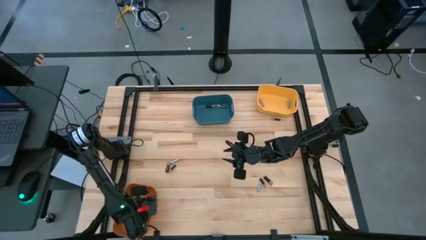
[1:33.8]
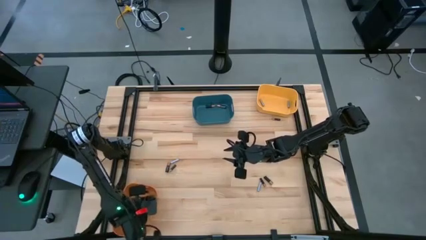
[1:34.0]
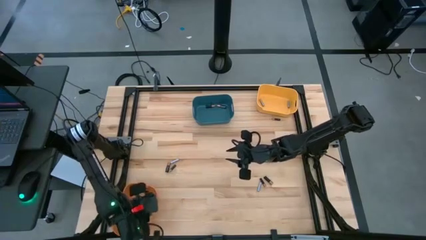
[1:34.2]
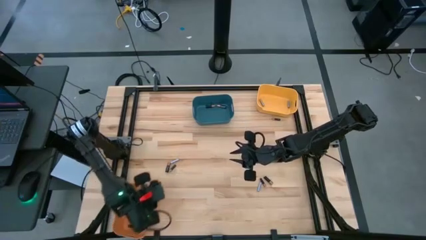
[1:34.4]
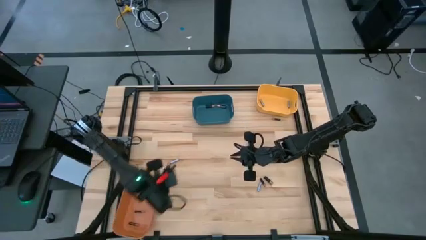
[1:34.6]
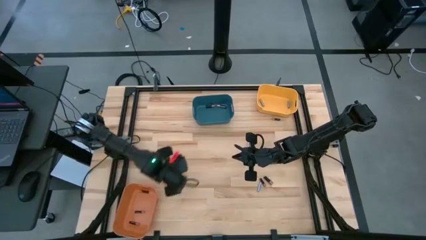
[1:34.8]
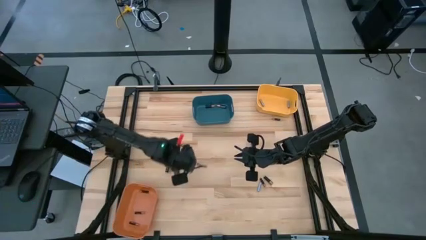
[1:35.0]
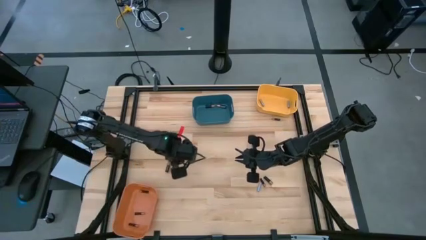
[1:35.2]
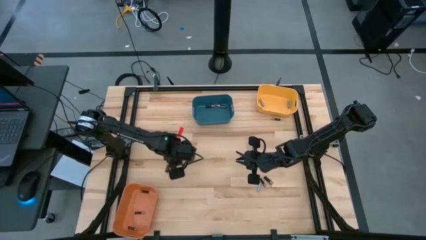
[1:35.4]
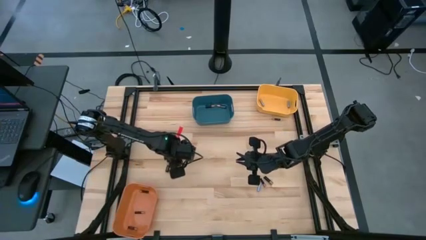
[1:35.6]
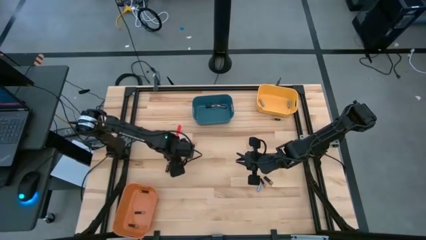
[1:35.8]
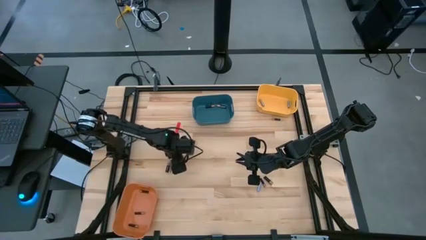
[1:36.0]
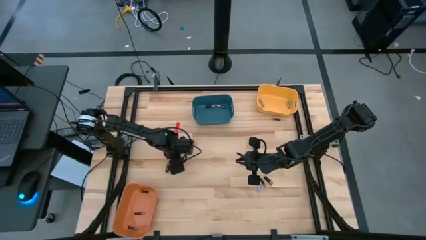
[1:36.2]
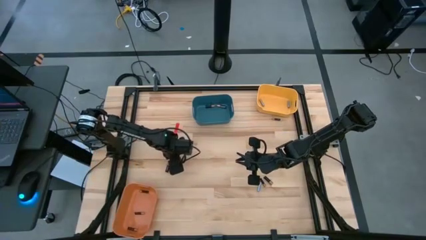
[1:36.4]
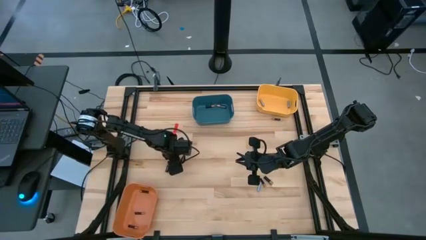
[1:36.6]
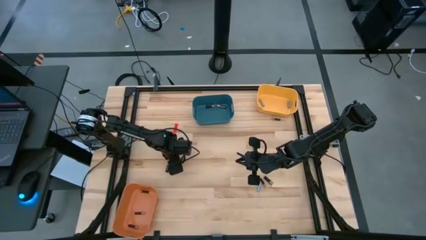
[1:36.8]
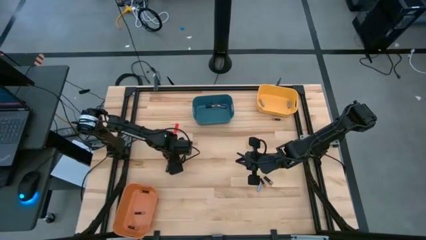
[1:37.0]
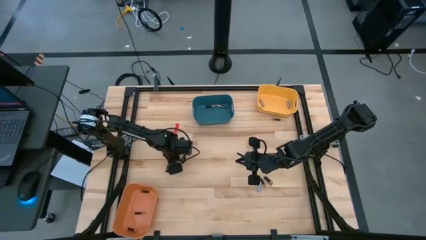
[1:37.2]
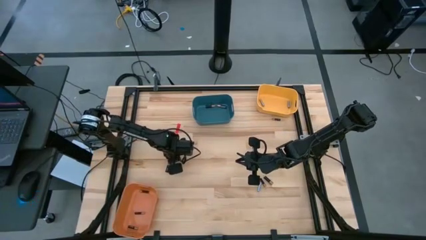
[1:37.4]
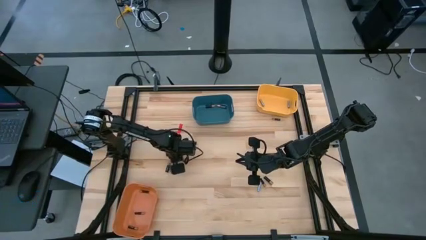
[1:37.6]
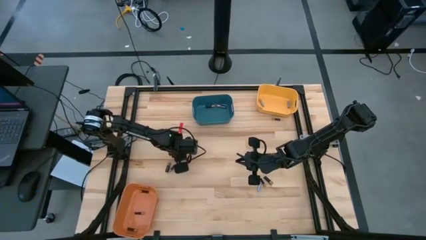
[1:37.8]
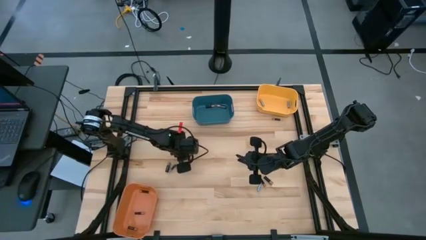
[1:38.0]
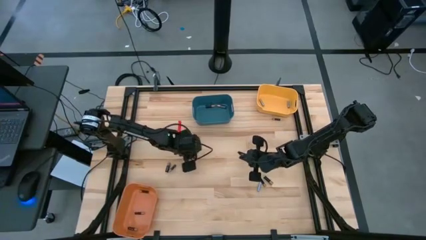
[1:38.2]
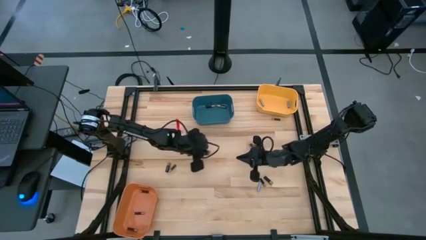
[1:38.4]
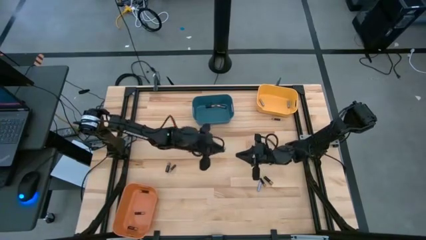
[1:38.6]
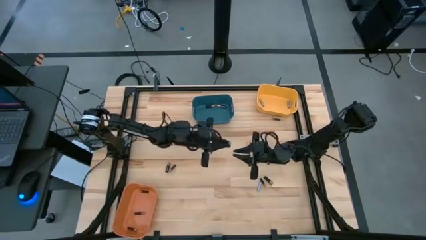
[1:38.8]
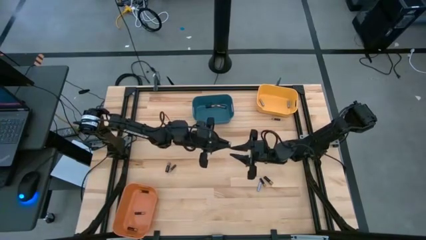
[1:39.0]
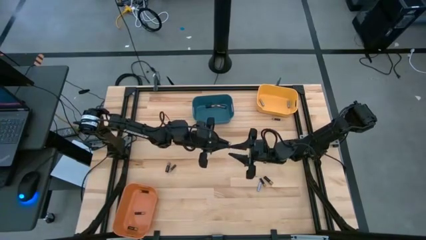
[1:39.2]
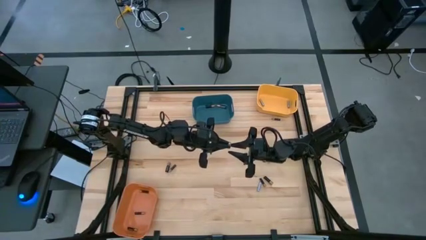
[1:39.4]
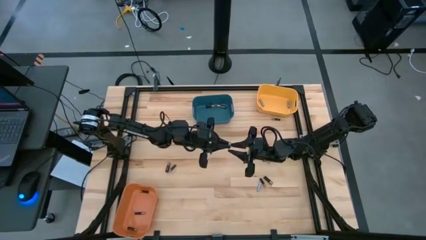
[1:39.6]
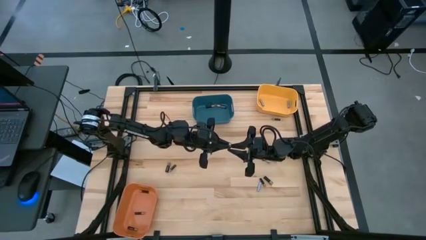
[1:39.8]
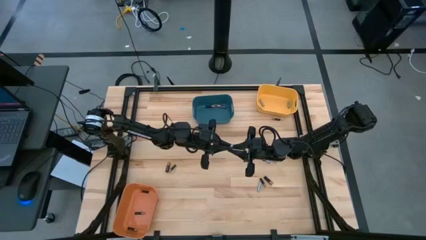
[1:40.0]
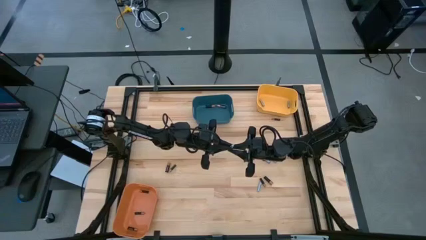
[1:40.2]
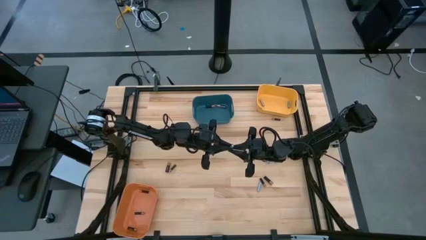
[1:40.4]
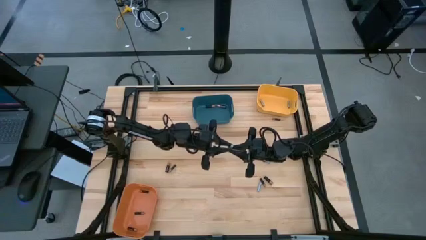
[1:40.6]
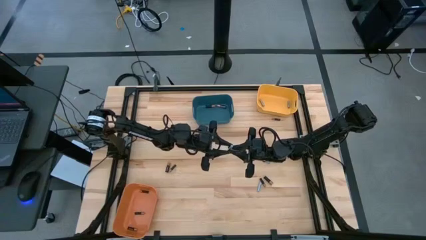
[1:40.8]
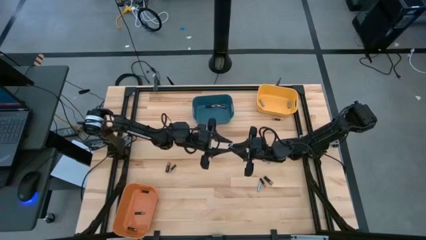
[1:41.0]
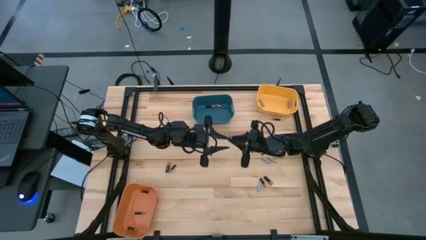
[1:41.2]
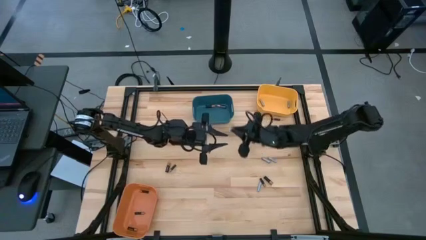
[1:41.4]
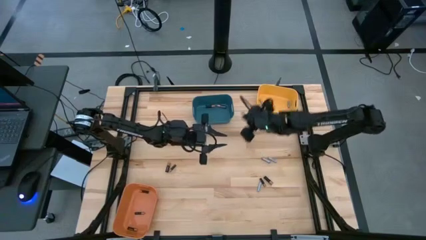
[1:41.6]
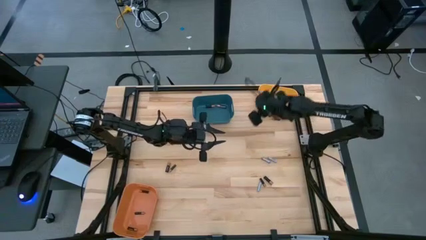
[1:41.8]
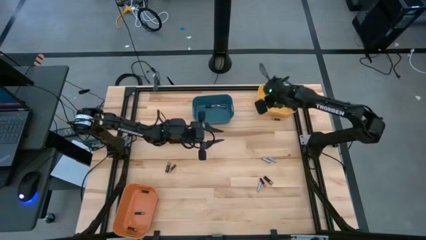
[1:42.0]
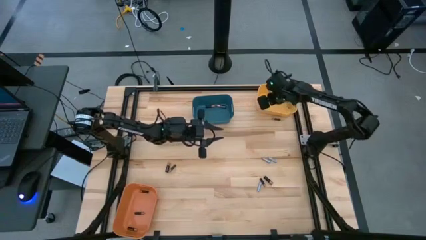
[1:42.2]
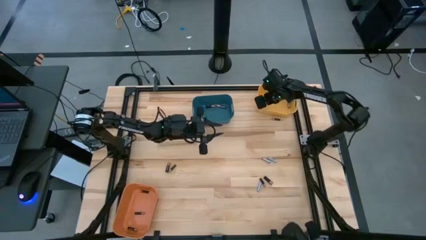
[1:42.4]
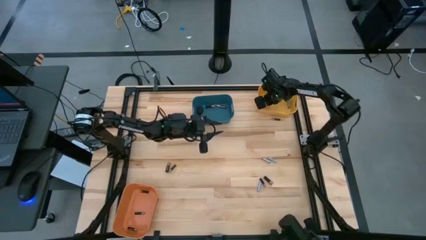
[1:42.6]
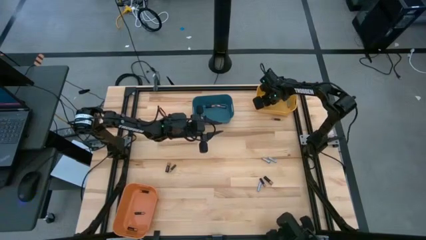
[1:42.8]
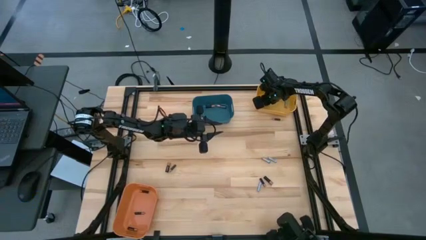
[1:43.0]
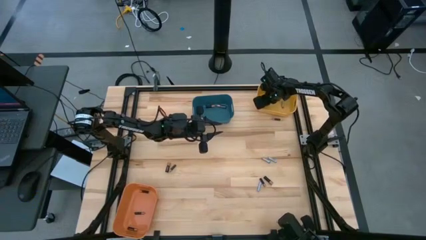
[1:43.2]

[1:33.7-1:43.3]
Task: Sort batteries
Put the white battery into the yellow bin

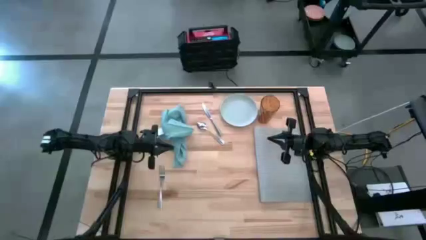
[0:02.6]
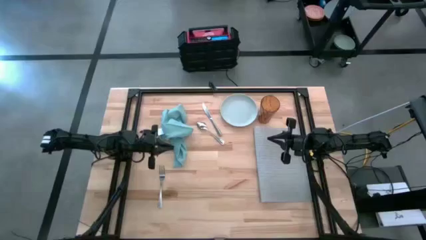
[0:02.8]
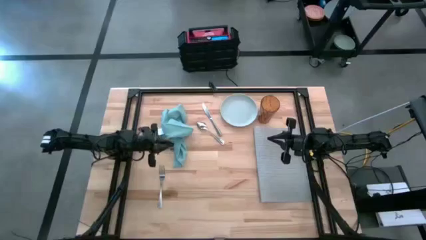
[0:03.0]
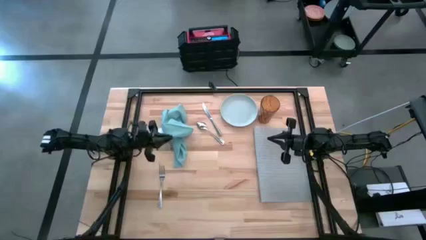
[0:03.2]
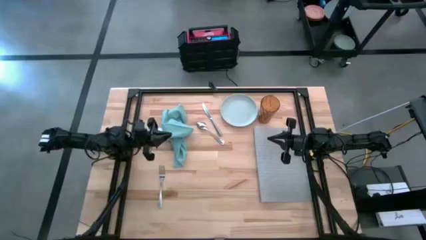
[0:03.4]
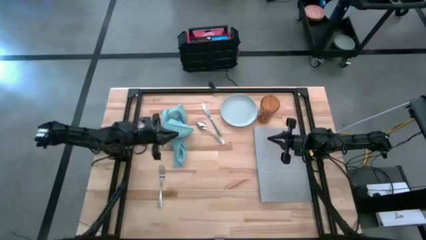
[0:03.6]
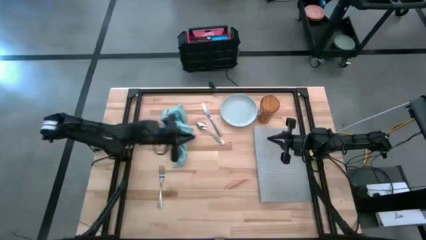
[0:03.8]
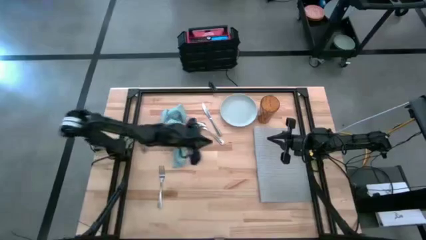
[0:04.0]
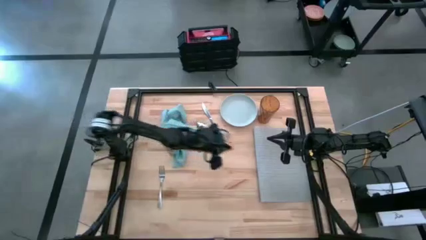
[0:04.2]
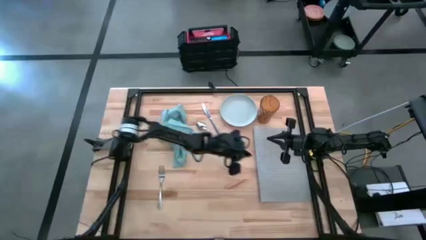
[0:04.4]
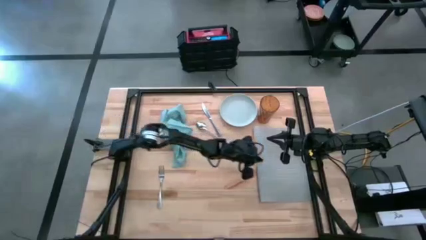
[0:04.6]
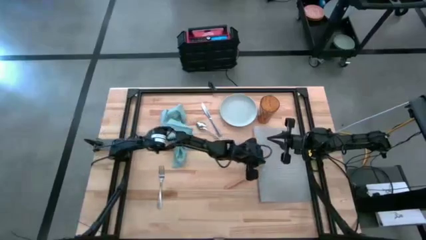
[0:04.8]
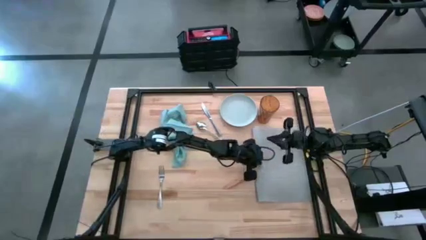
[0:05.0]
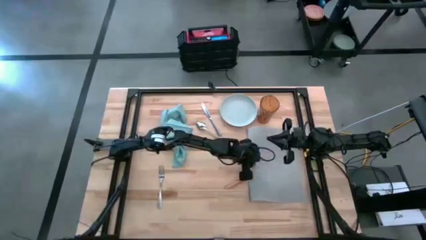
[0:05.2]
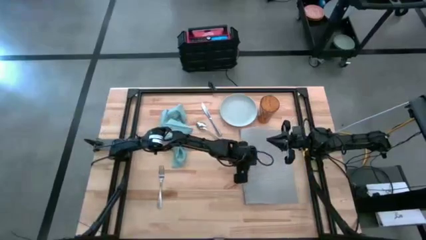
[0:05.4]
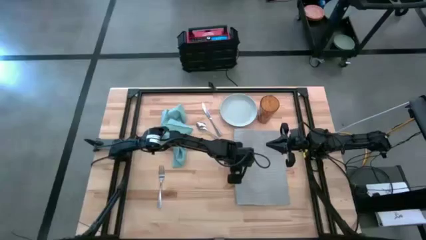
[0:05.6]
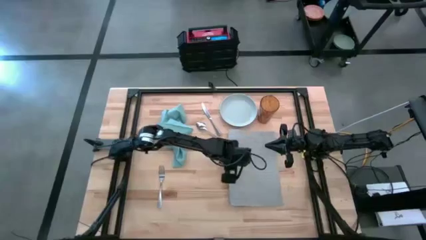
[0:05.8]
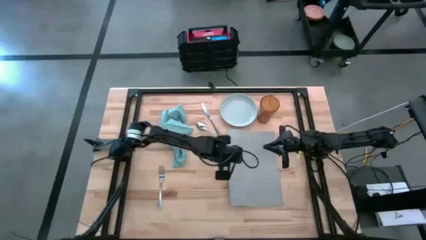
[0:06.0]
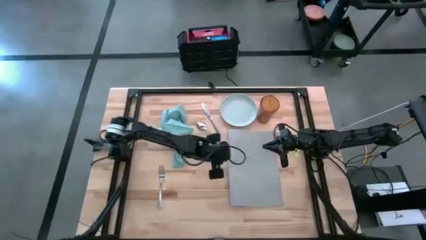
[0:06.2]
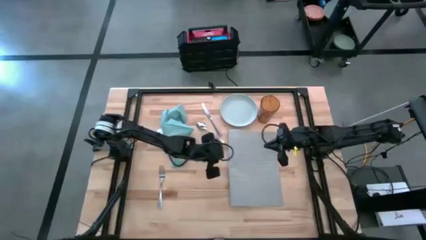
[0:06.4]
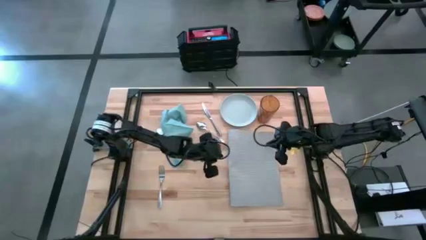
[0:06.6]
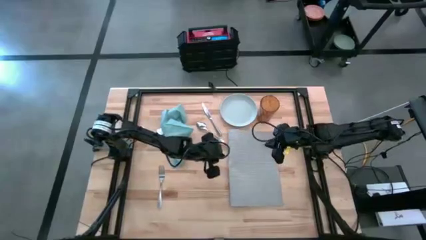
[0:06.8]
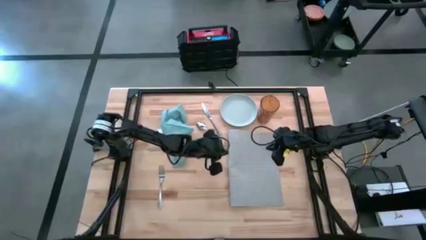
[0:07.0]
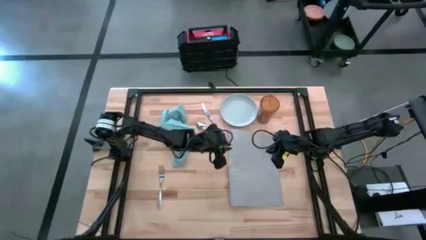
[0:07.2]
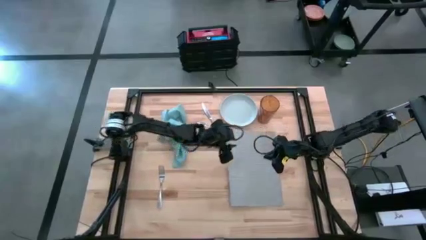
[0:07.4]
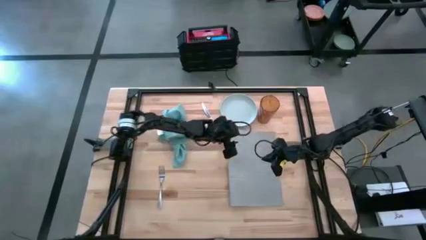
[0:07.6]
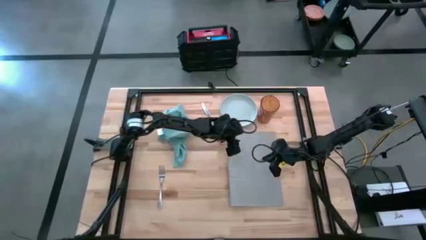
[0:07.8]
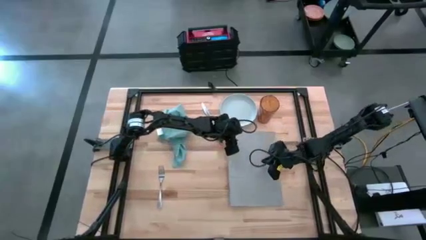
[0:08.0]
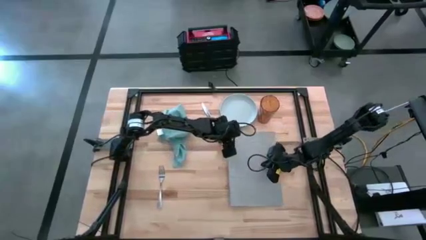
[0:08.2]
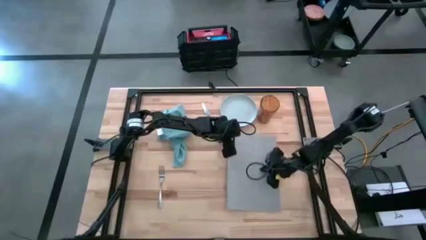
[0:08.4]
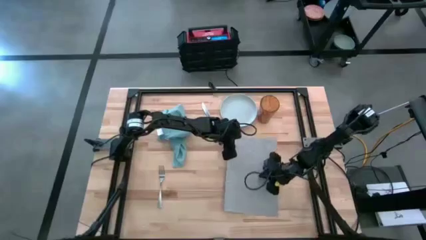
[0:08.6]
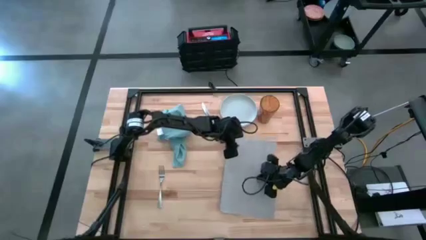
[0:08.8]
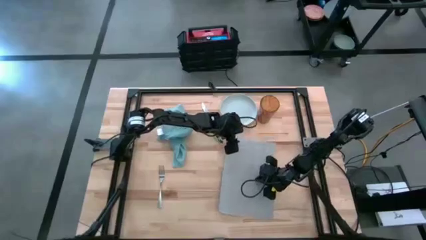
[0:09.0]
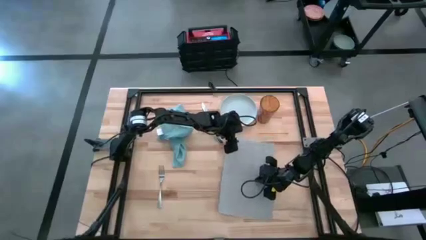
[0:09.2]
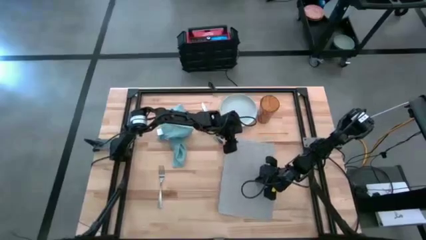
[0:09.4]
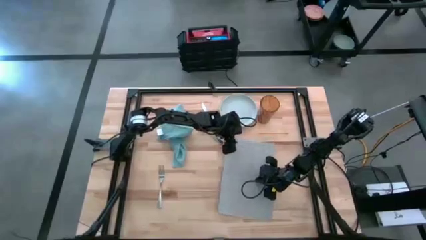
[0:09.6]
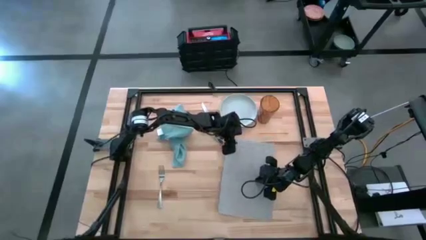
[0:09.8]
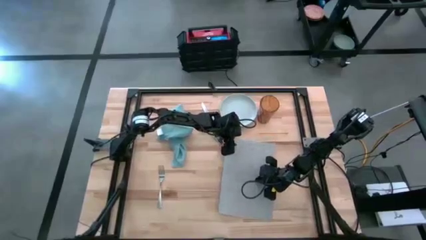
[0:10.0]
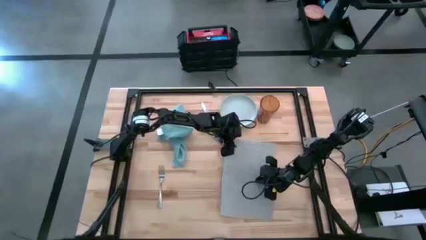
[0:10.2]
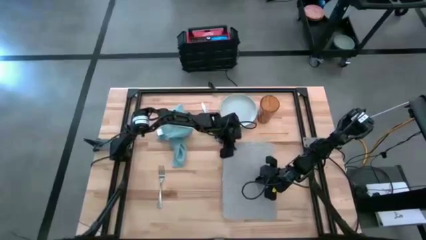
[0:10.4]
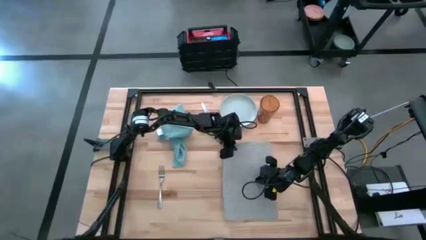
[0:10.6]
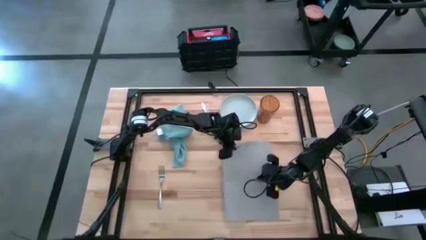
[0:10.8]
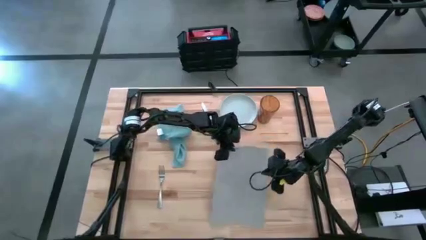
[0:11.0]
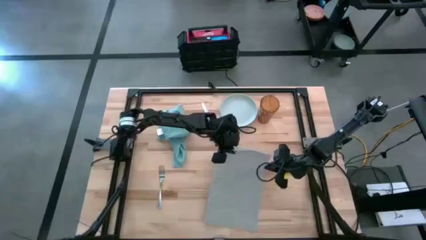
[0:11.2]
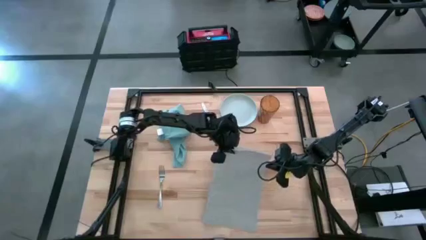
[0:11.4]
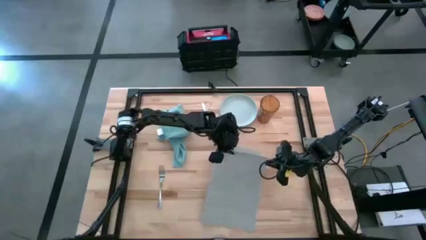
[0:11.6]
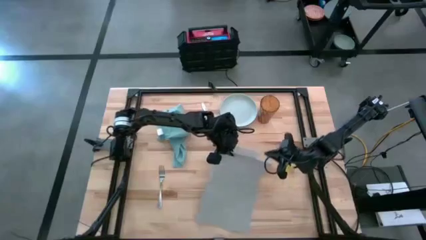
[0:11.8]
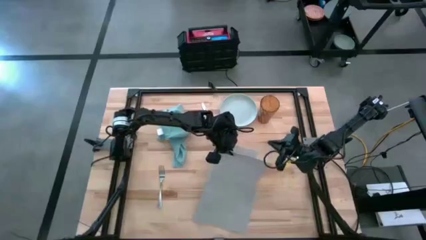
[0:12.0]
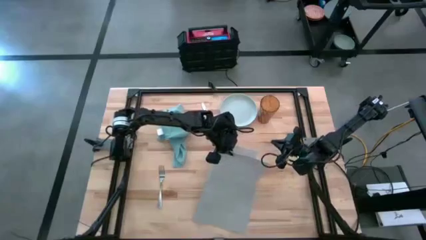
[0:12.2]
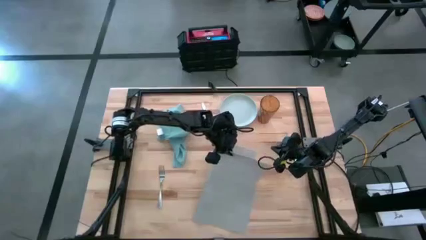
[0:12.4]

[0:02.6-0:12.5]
Task: Set table place
Prepare the gray placemat
